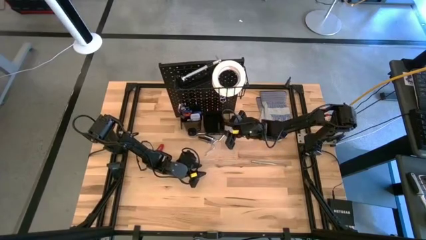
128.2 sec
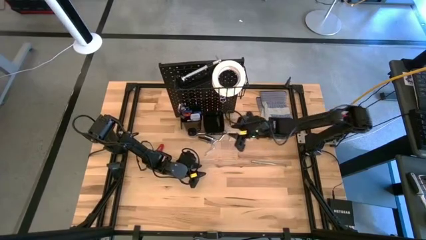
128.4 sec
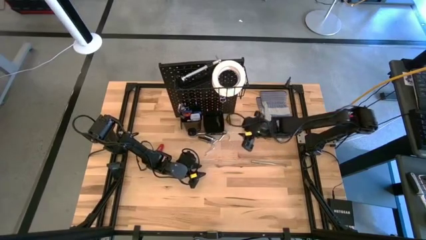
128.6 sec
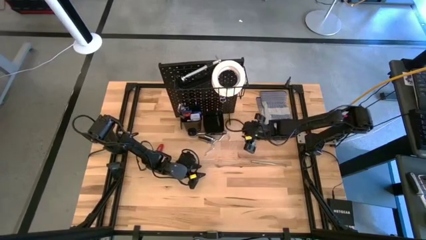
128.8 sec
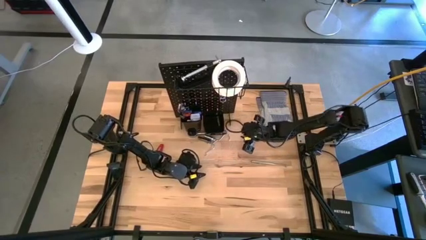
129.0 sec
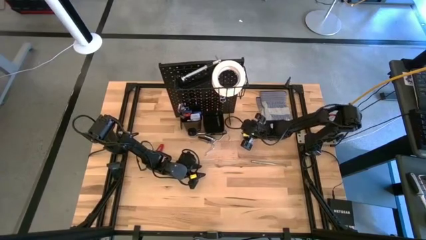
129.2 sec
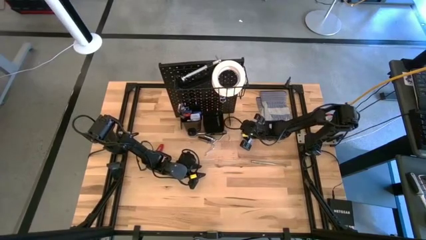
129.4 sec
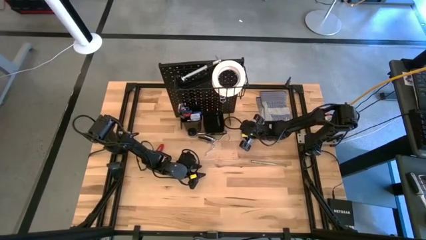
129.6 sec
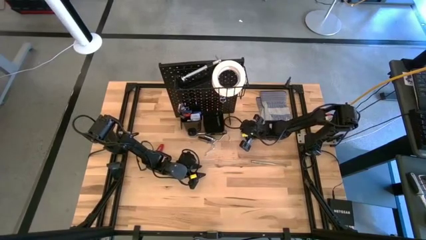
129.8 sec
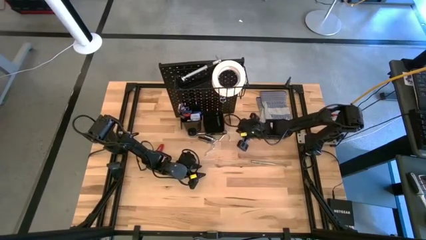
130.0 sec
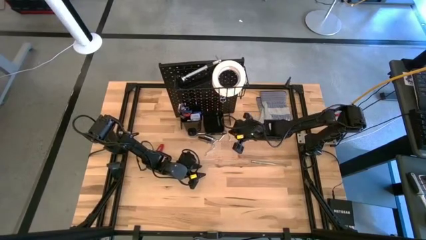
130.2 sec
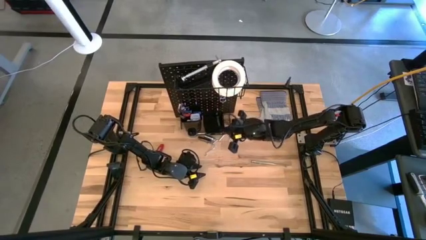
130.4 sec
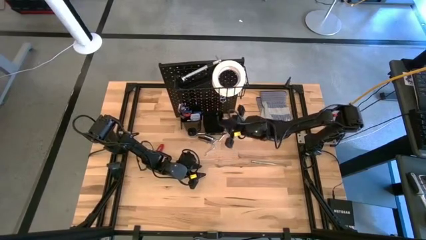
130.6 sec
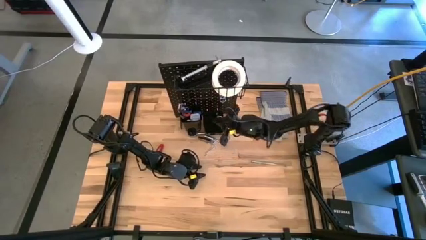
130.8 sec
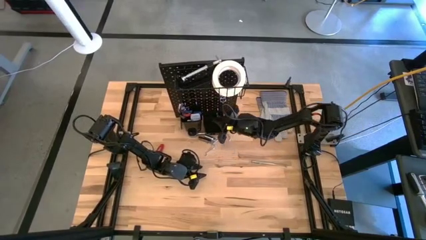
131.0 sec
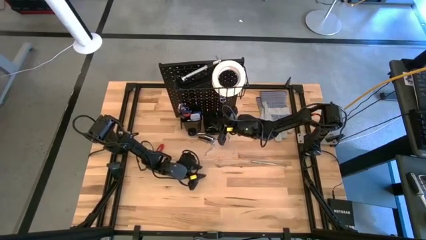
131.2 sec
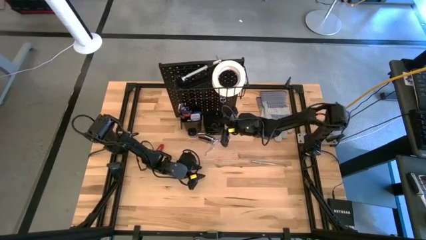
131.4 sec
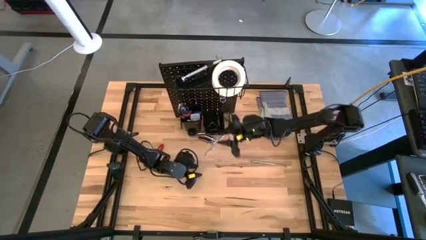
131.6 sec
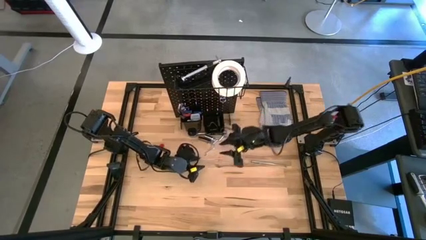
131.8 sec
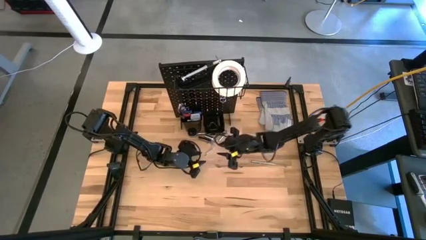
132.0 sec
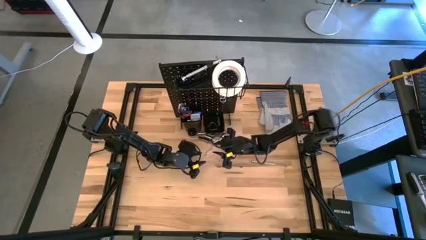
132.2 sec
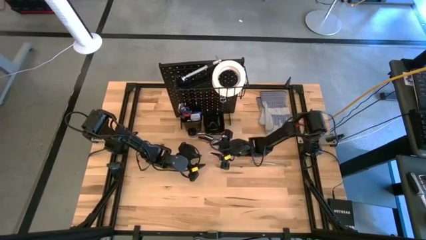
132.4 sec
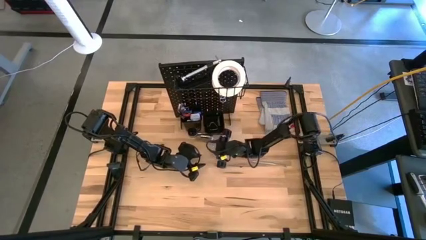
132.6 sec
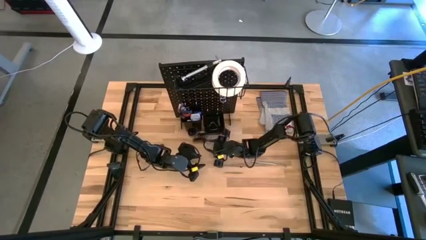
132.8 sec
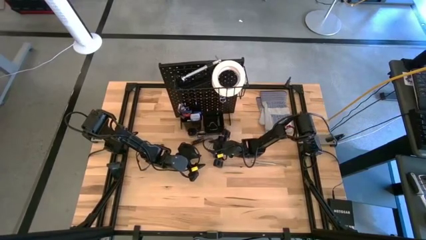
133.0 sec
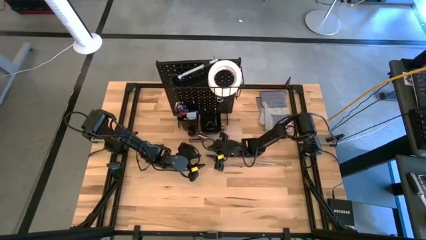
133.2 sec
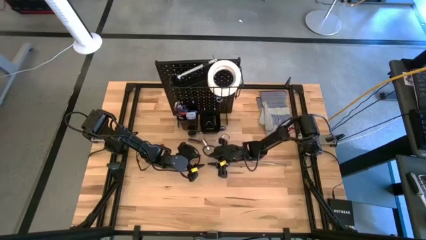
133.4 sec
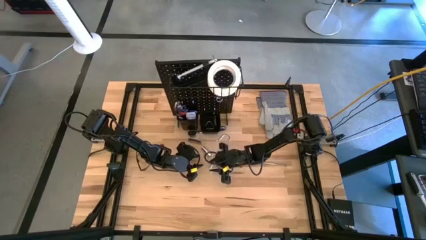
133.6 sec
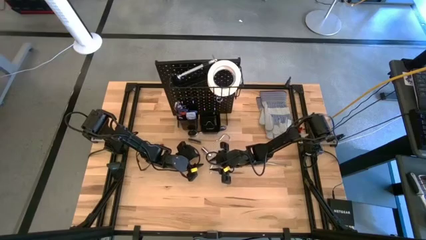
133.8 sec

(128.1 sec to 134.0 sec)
Task: Hang tools onto peg board
Put the pegboard hook into the right bin on the pegboard

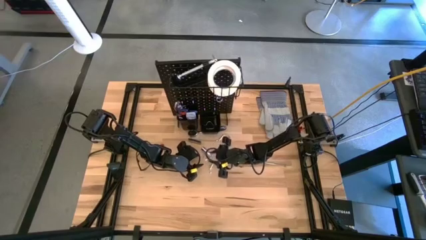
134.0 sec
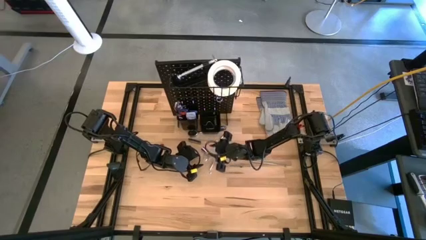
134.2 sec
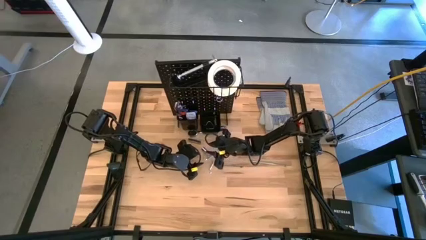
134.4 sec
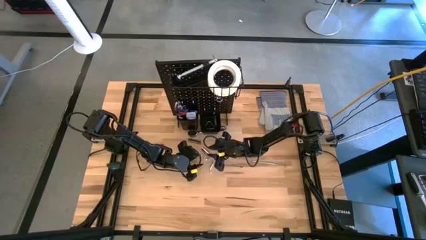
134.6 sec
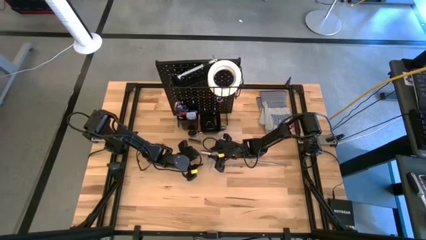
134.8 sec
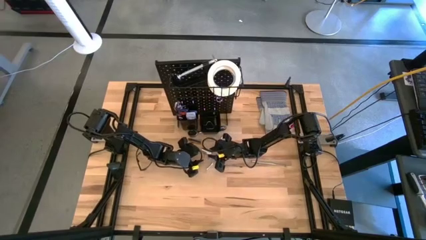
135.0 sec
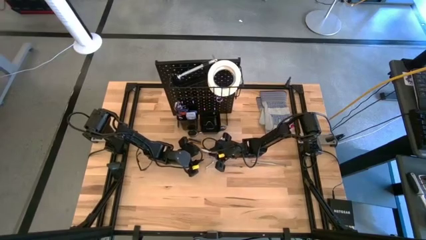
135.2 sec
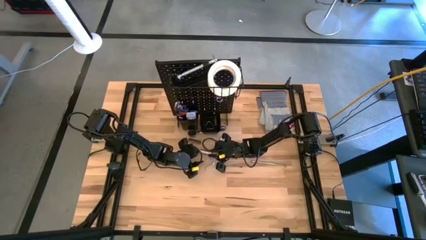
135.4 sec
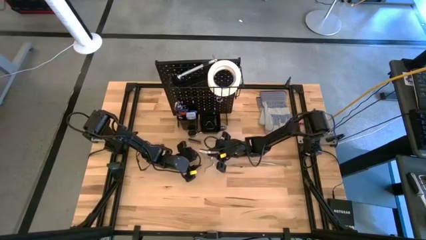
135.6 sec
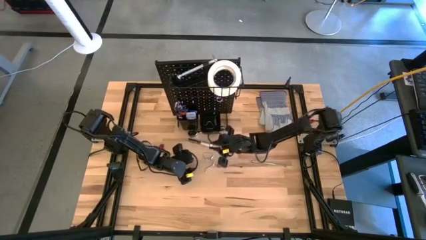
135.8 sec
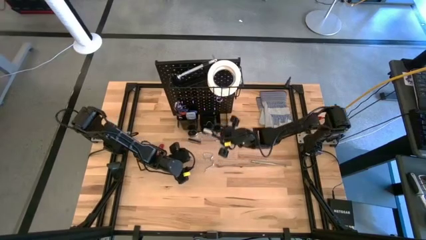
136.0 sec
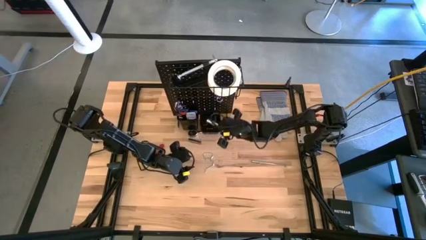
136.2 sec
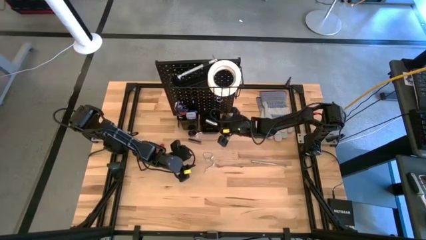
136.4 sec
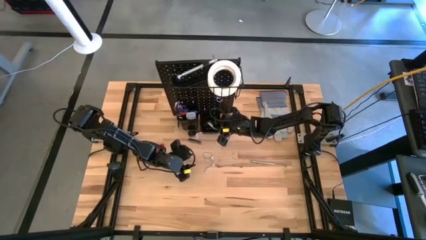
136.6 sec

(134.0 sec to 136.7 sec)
Put the socket into the right bin on the pegboard

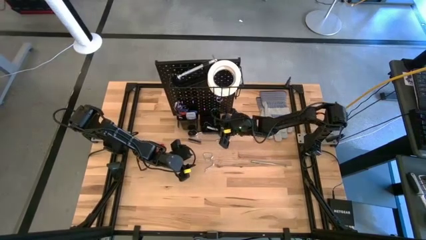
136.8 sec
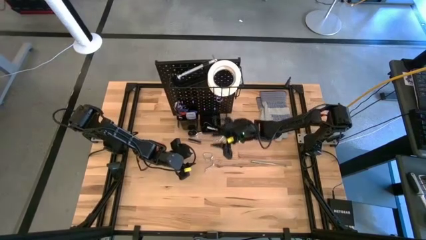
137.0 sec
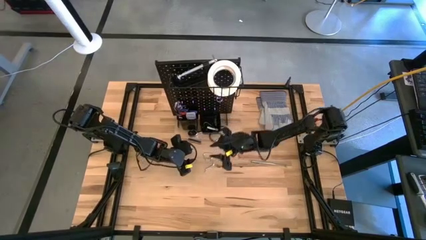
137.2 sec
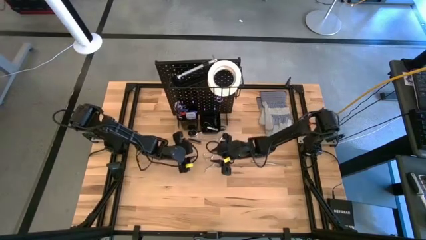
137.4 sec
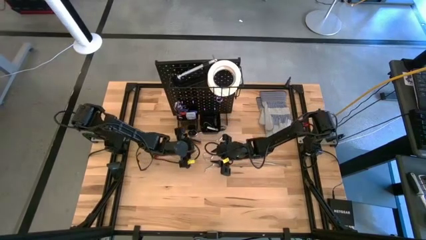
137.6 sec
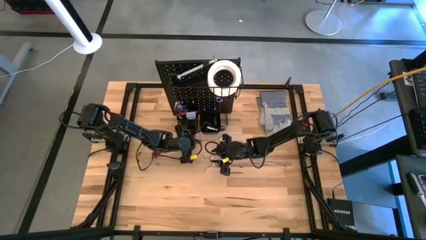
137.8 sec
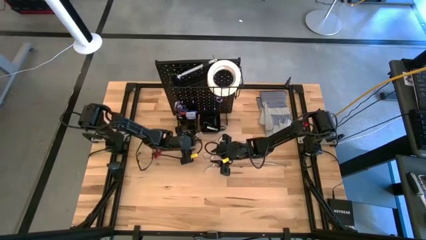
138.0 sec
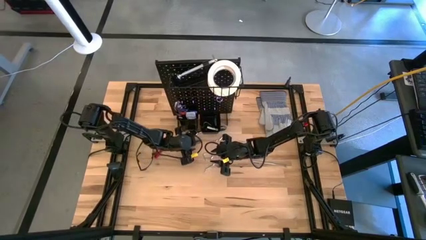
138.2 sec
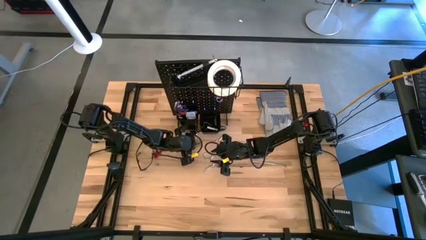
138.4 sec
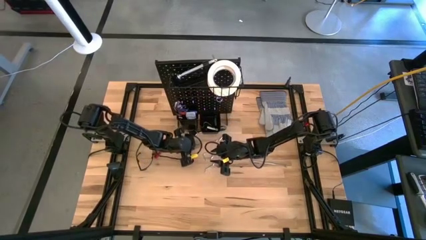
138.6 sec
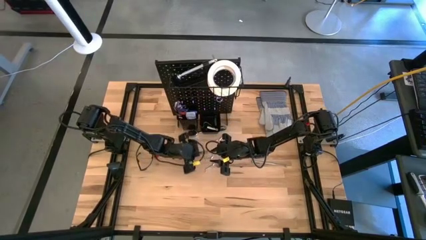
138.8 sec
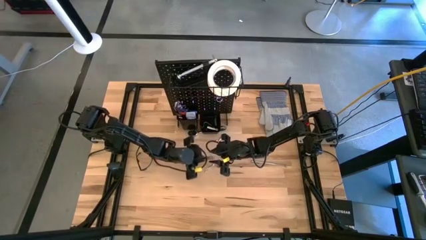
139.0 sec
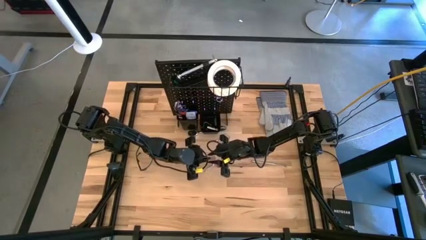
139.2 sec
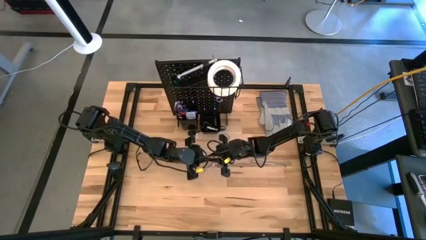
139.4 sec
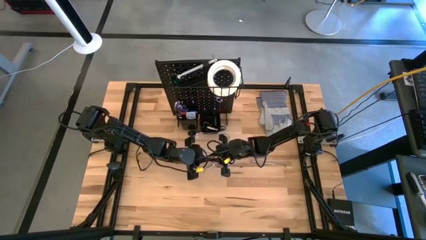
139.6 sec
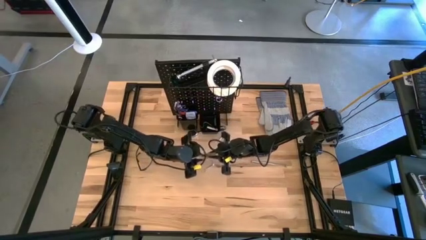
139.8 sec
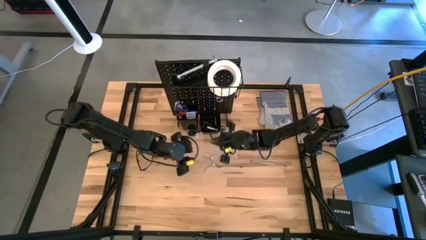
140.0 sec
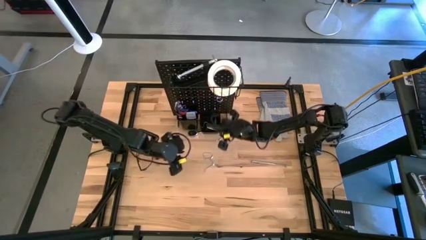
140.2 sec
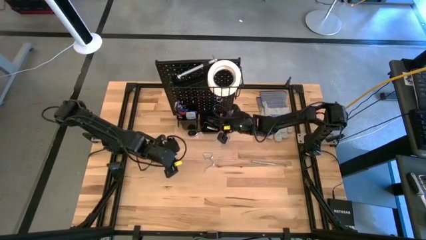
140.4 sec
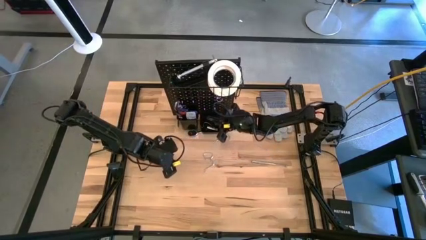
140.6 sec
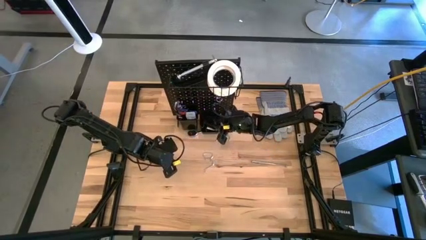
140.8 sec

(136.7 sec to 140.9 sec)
Put the digital spirit level bar on the pegboard

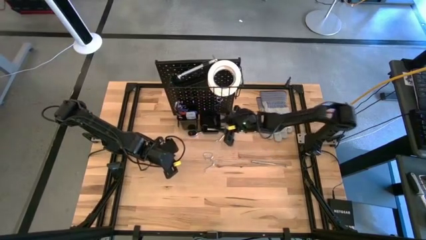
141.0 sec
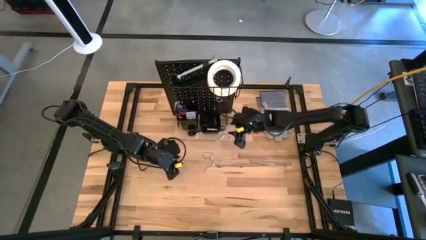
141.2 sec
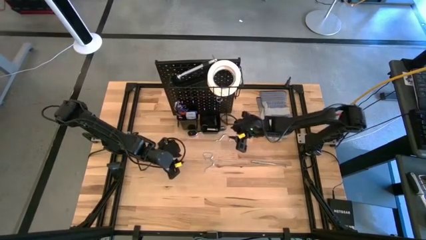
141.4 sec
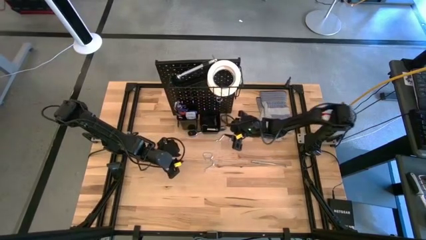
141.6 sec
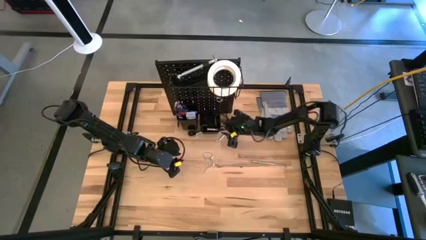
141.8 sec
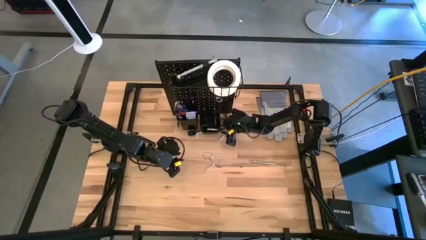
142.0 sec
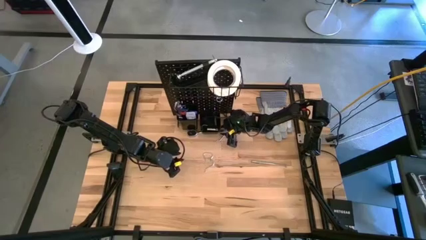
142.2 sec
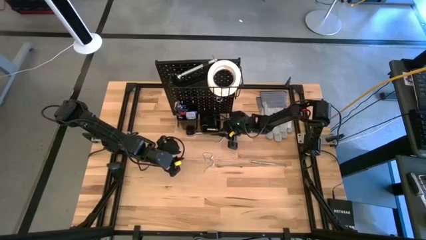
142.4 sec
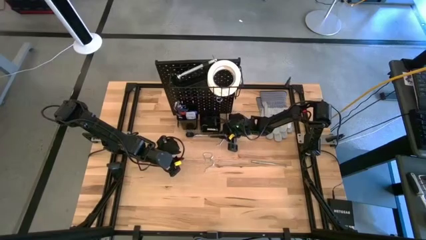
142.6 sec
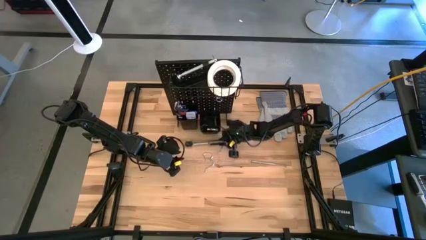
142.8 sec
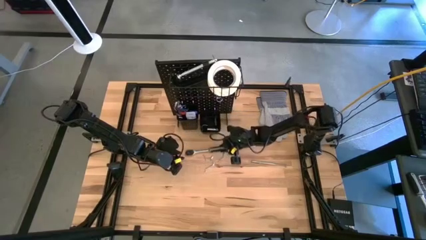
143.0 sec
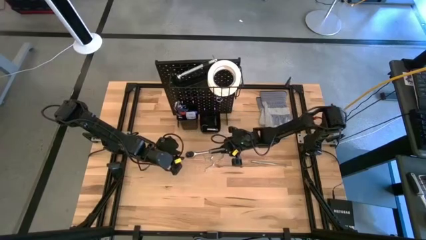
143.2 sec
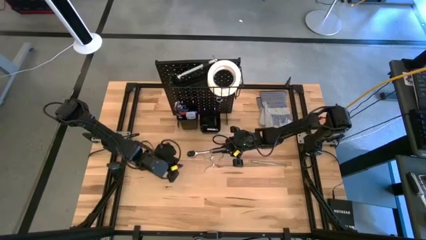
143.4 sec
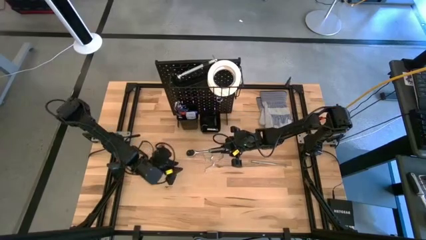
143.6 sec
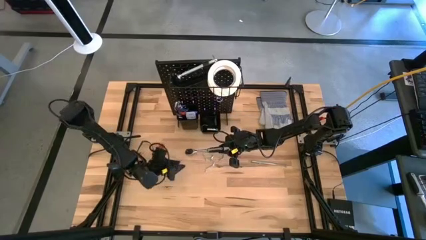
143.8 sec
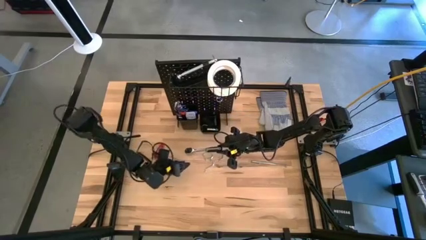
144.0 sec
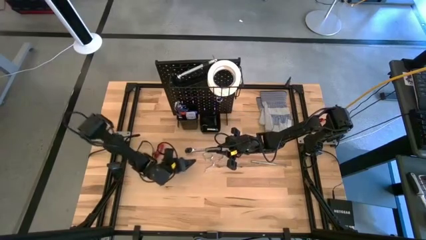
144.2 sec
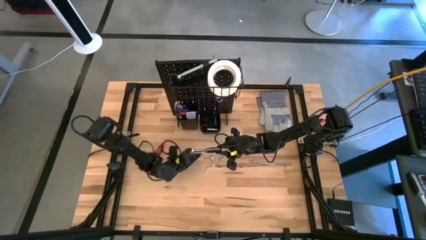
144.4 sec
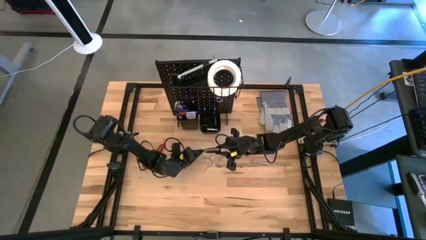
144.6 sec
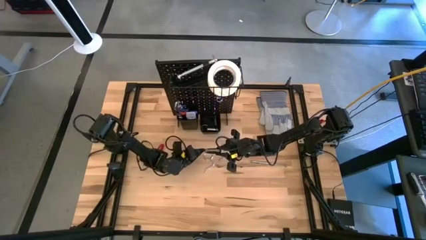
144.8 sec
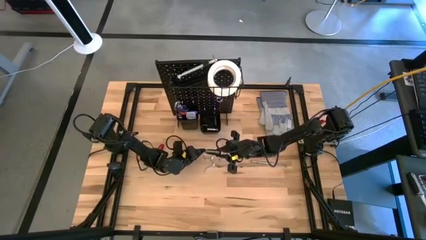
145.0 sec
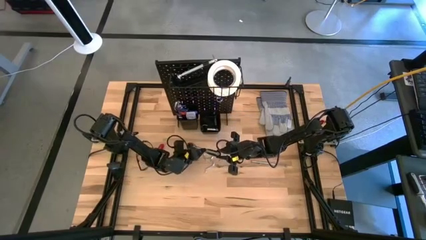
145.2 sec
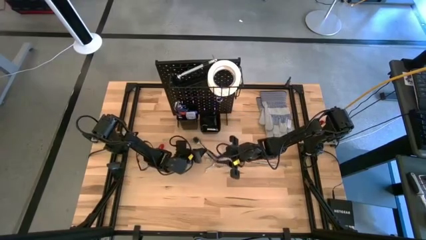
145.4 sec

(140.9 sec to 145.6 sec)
Put the ratchet wrench into the left bin on the pegboard
